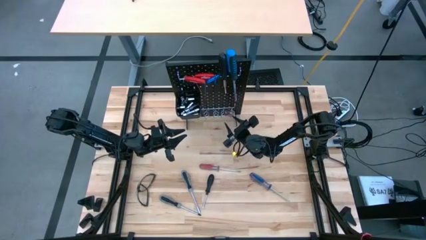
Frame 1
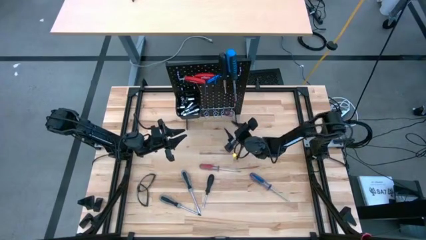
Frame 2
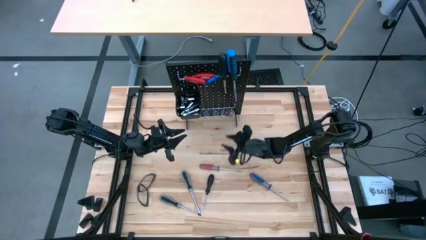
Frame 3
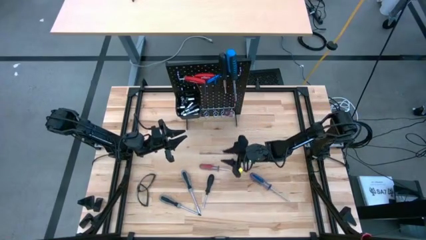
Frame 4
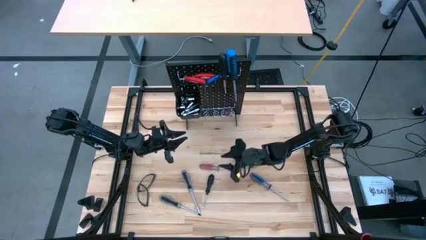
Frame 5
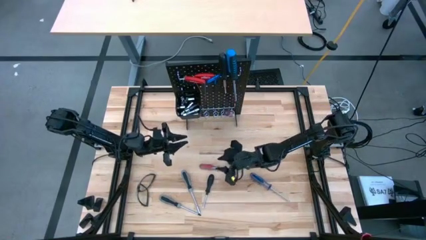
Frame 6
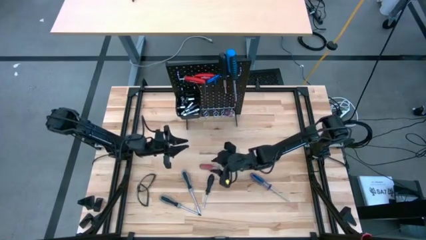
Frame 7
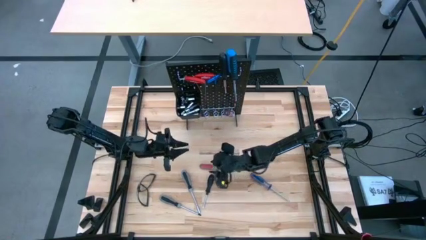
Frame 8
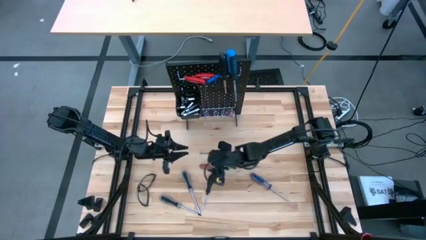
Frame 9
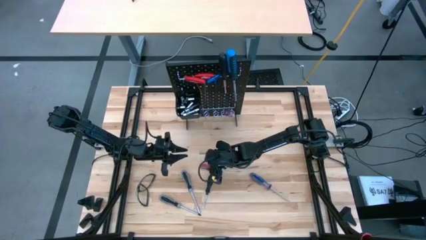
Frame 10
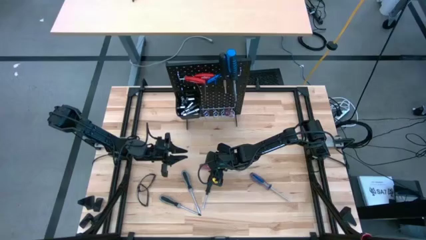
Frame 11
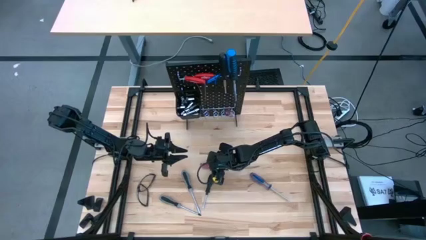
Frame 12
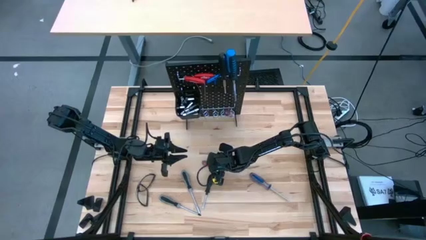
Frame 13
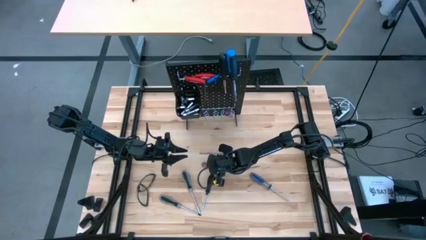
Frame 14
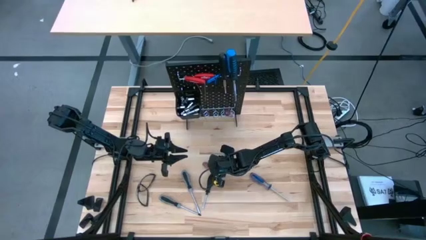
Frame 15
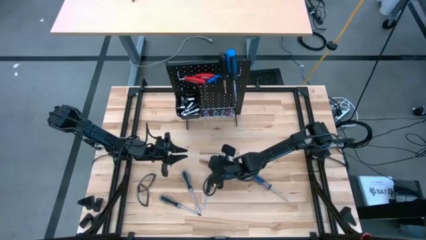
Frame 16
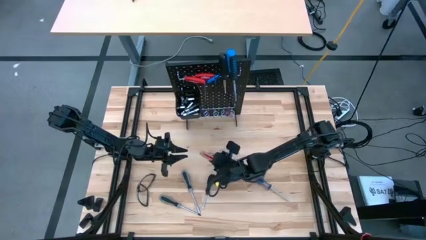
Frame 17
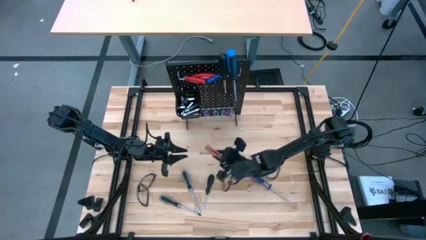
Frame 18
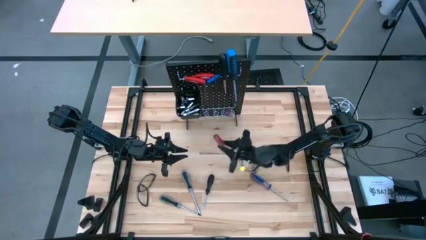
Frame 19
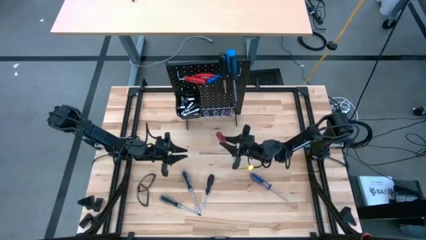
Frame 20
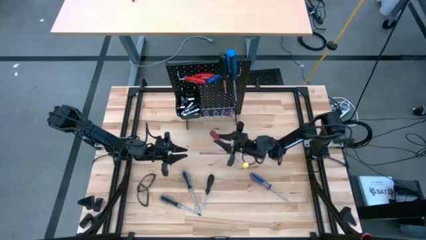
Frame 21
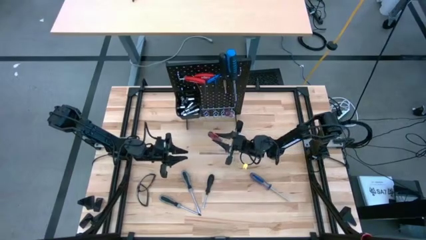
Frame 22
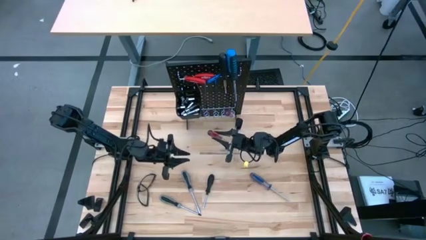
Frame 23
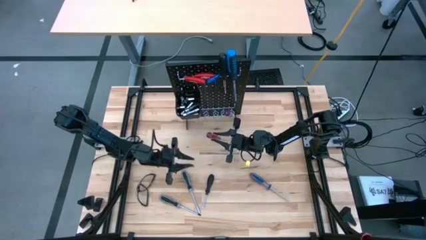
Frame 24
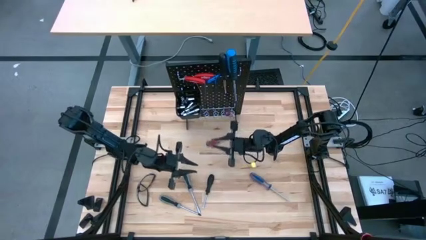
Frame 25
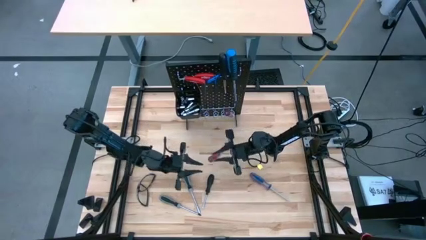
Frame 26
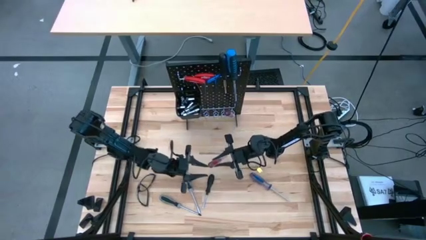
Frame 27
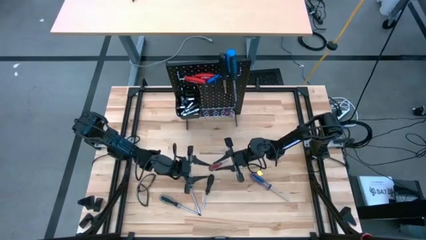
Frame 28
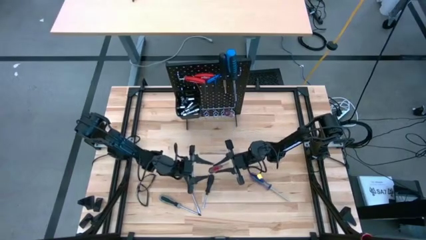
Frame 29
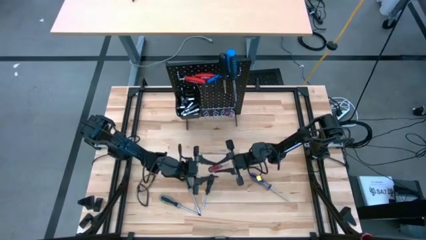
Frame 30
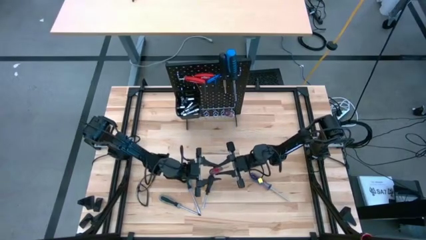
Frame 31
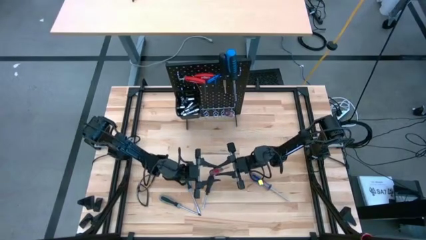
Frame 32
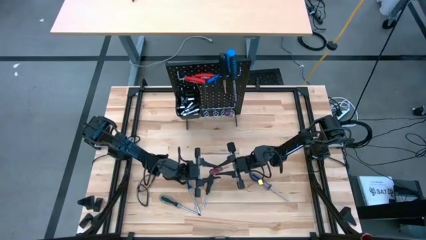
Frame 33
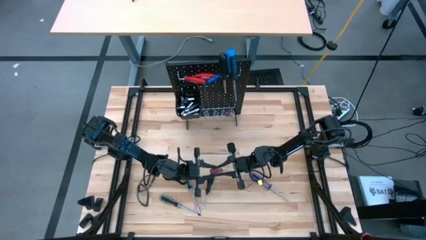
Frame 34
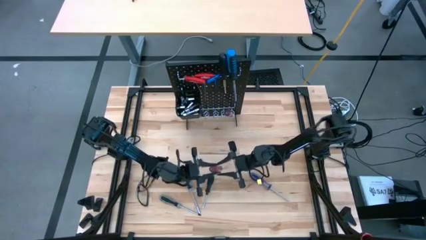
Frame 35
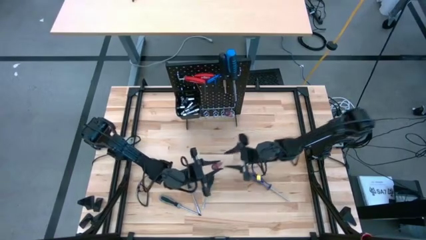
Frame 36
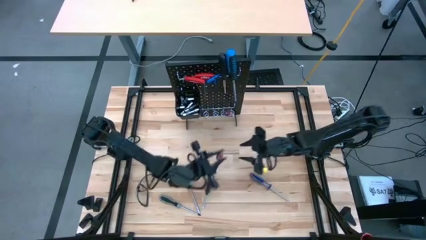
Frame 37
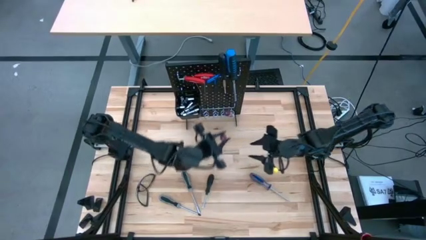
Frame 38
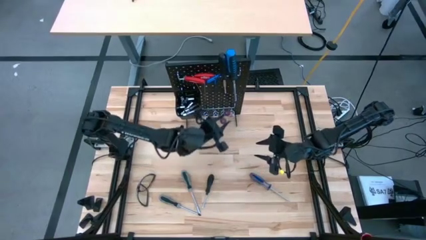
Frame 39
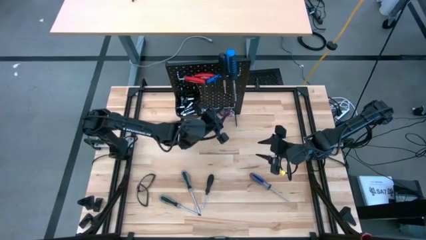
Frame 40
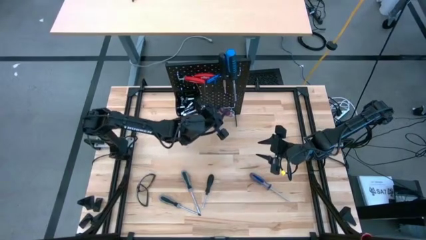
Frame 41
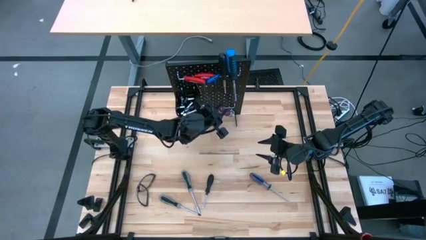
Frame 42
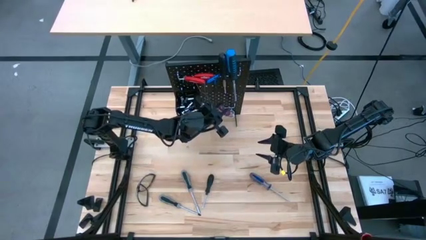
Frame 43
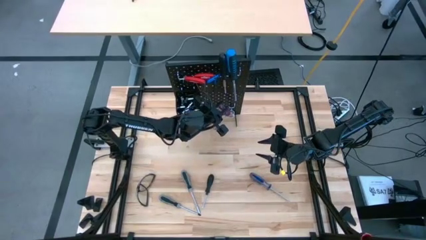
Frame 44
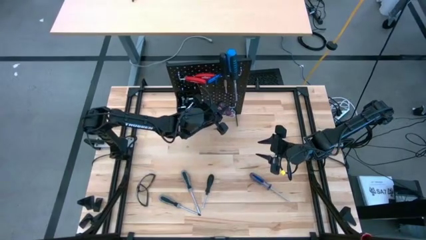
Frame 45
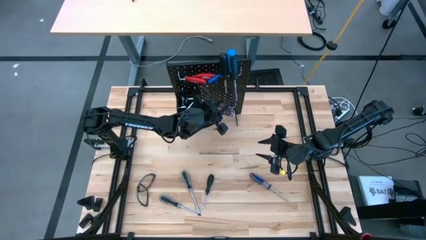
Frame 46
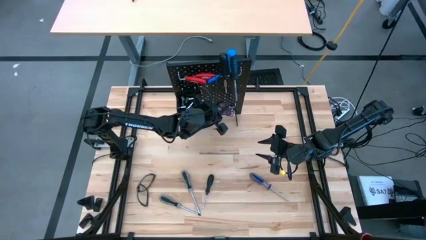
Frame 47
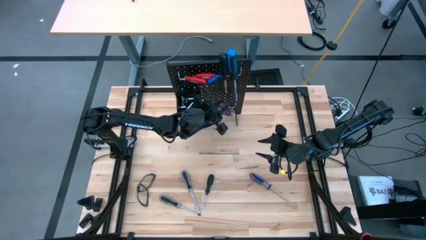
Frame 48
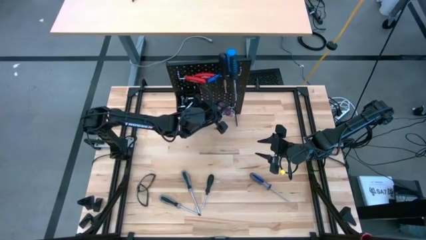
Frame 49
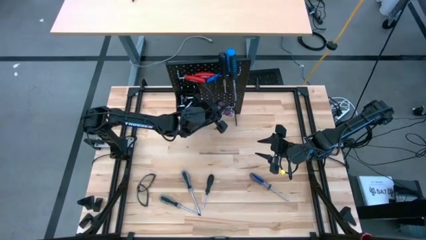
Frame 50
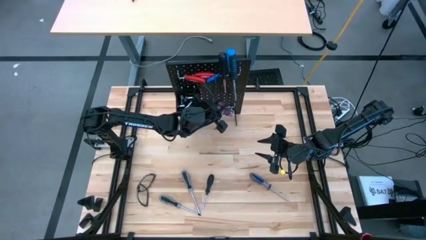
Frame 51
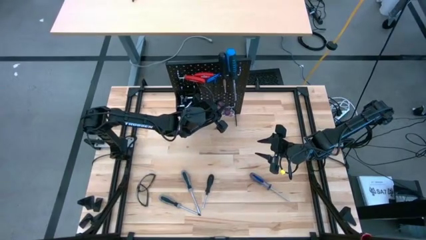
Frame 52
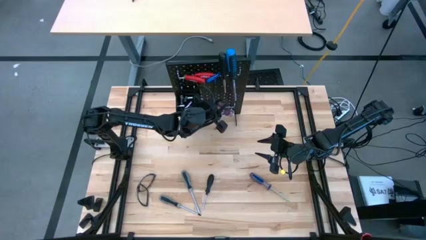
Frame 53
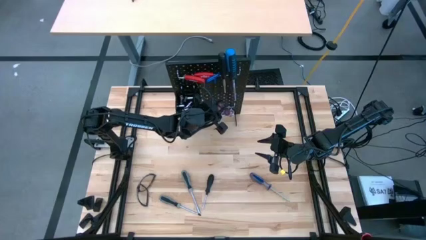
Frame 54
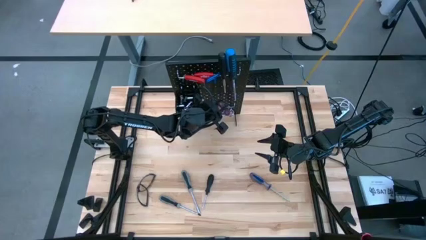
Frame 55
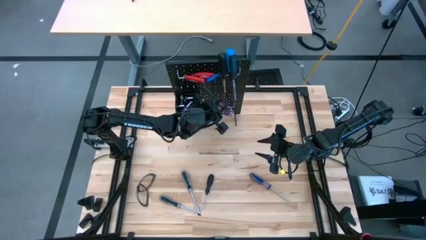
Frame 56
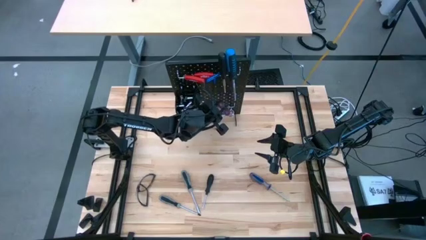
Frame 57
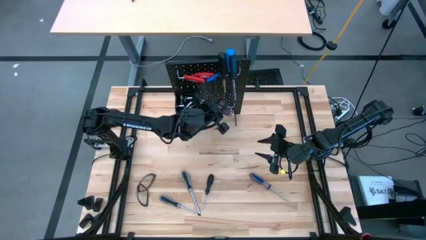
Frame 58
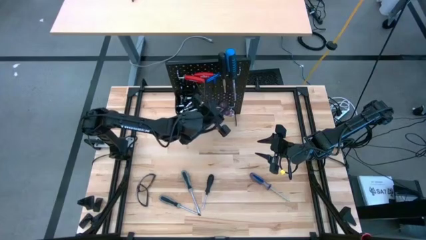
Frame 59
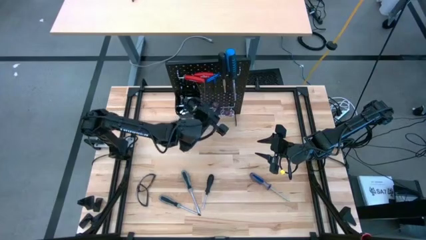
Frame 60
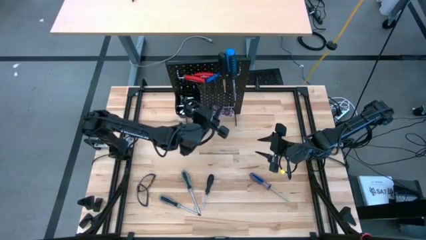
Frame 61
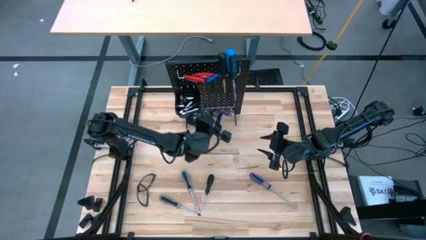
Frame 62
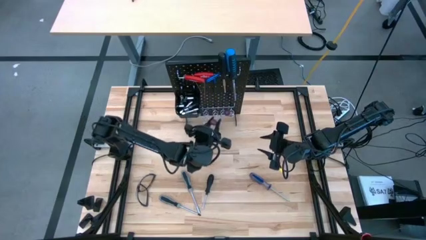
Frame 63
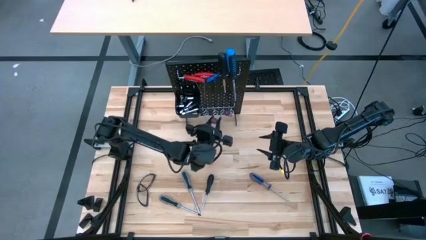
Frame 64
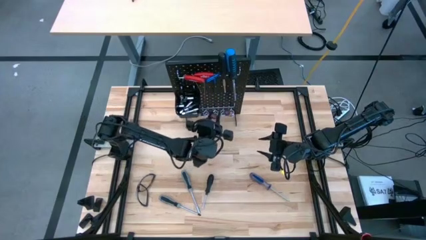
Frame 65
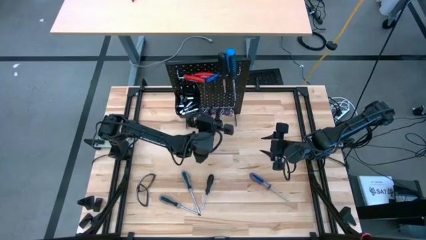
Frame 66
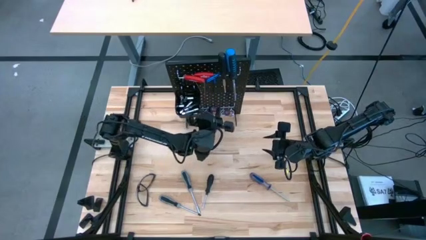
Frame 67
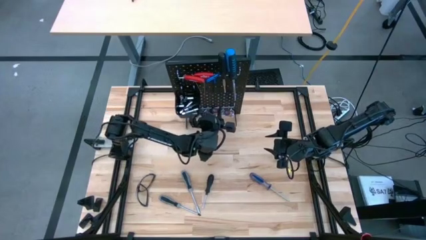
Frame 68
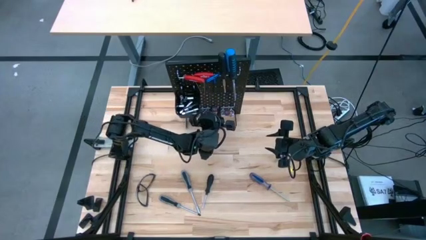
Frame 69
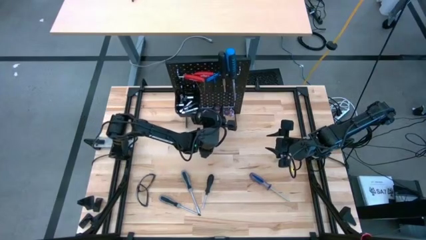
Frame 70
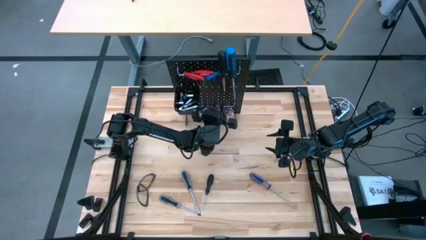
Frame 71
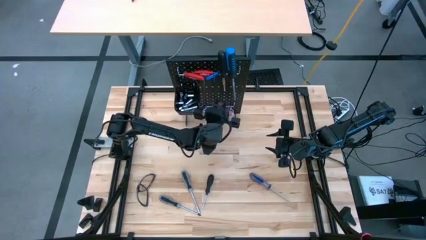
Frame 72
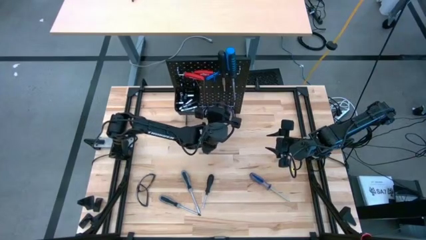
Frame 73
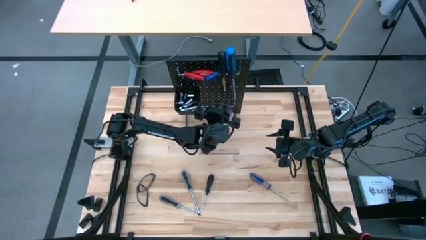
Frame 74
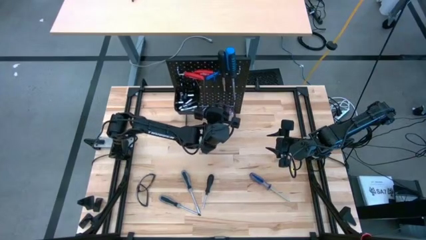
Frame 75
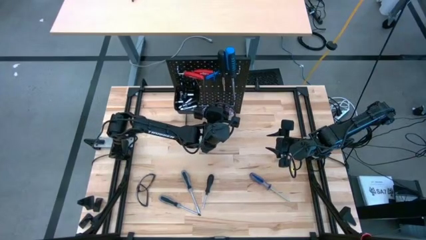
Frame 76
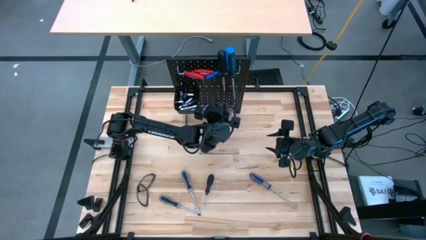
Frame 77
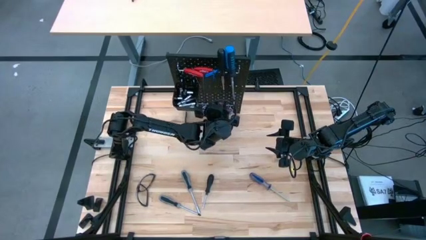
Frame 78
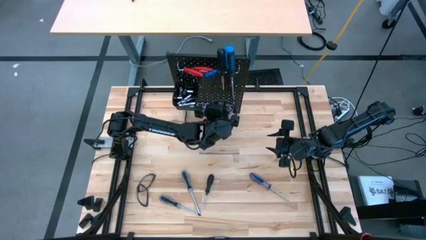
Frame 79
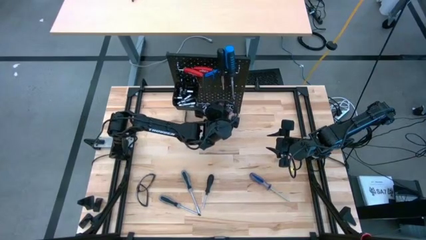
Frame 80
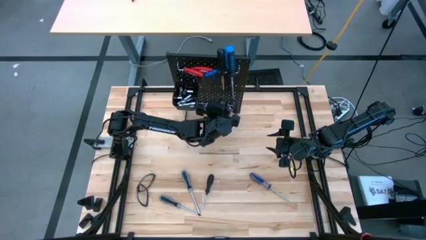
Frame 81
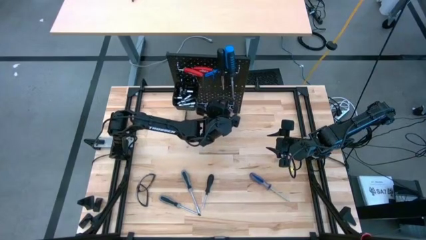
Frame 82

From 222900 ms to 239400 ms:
Task: Hang tools onto peg board
Hang the red screwdriver on the pegboard
